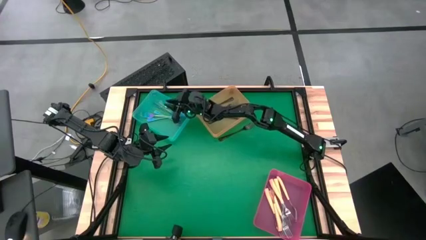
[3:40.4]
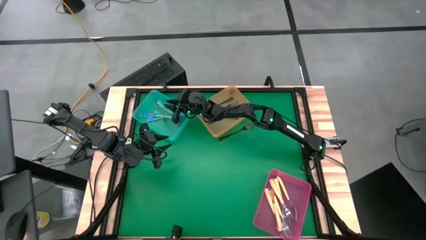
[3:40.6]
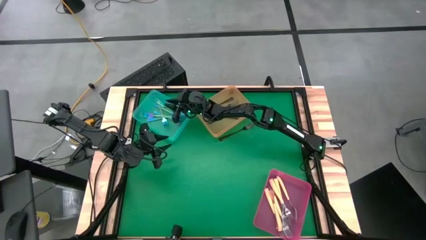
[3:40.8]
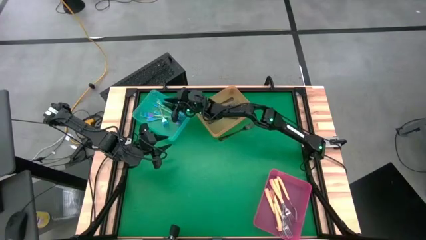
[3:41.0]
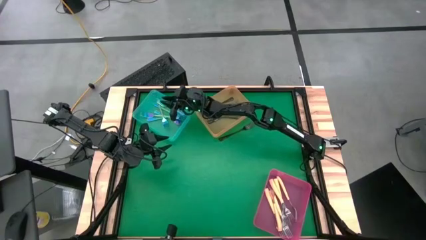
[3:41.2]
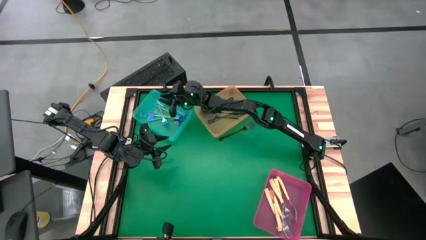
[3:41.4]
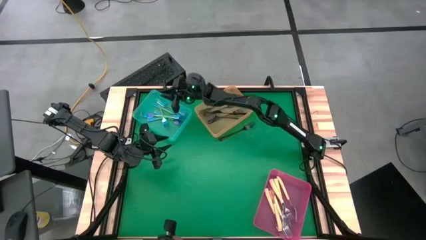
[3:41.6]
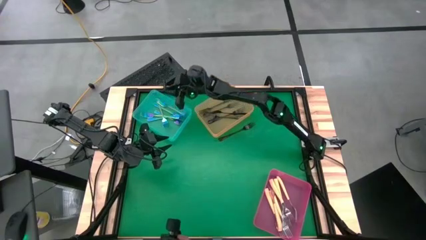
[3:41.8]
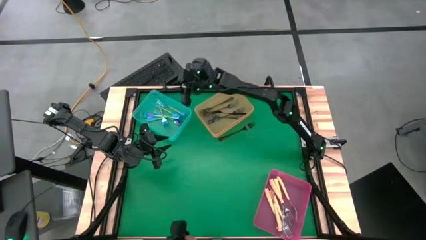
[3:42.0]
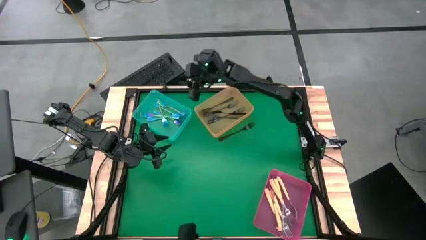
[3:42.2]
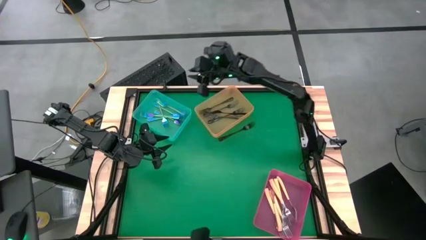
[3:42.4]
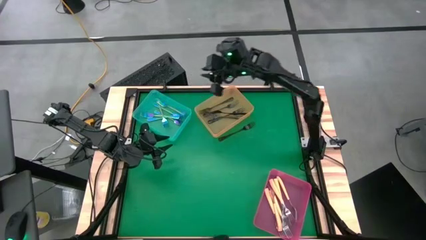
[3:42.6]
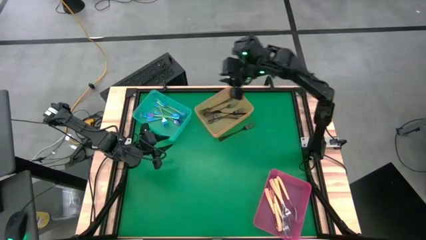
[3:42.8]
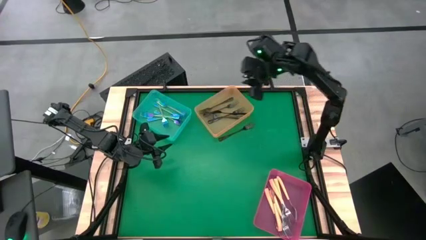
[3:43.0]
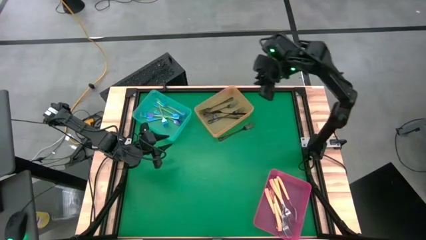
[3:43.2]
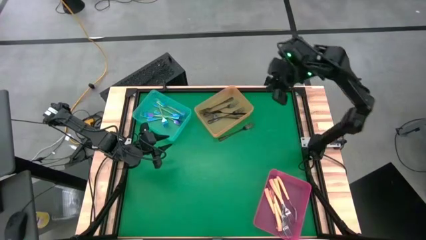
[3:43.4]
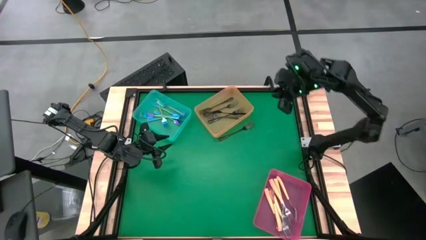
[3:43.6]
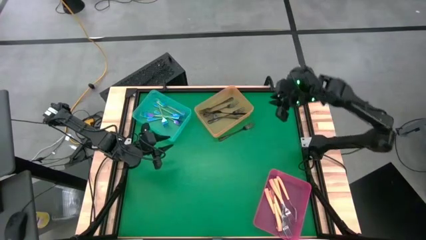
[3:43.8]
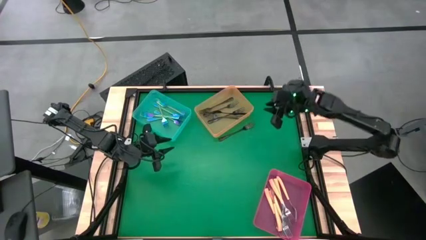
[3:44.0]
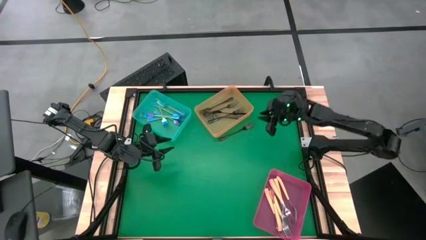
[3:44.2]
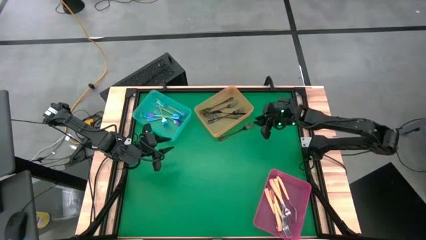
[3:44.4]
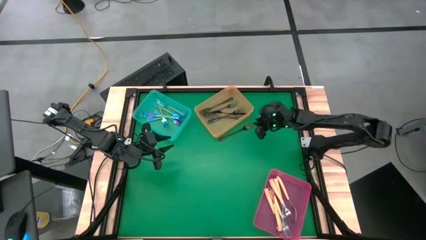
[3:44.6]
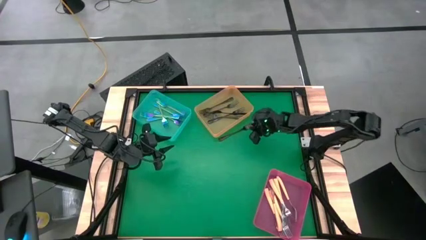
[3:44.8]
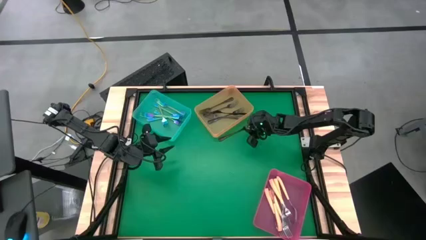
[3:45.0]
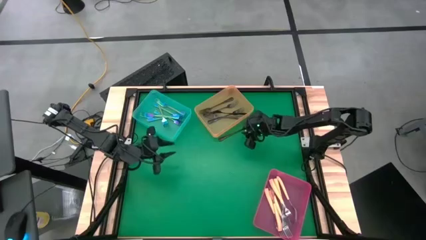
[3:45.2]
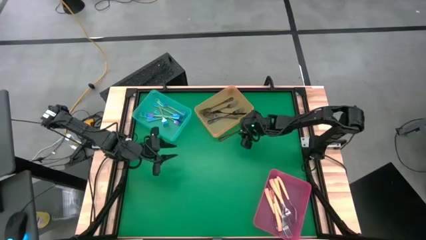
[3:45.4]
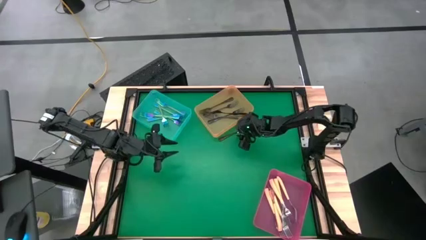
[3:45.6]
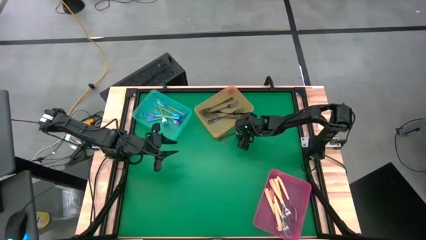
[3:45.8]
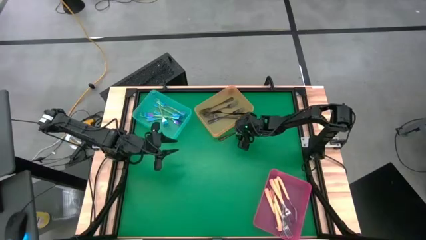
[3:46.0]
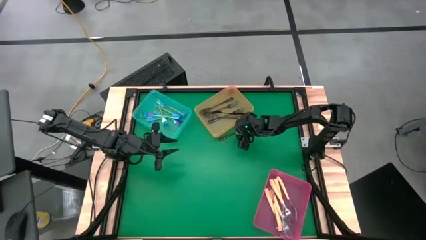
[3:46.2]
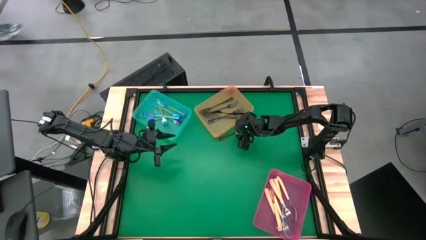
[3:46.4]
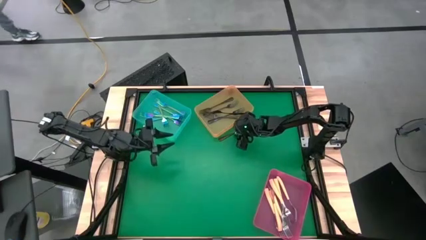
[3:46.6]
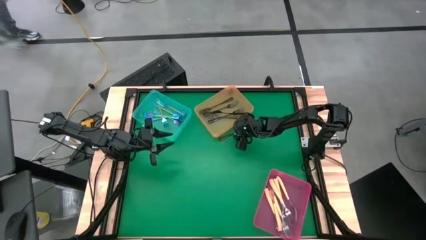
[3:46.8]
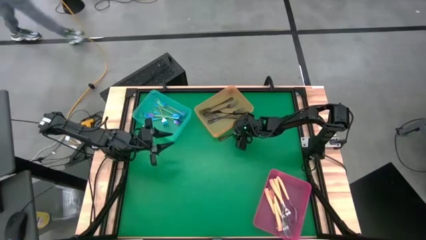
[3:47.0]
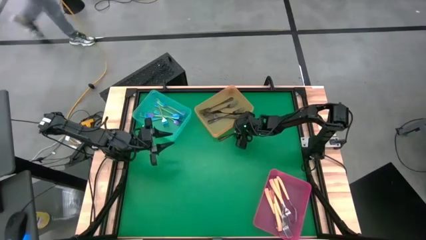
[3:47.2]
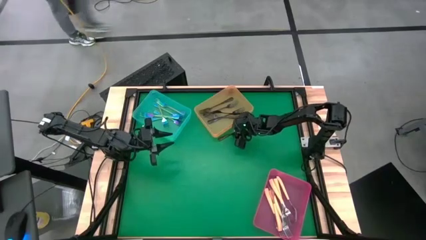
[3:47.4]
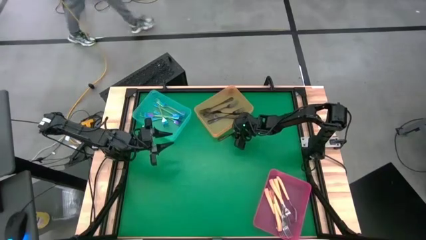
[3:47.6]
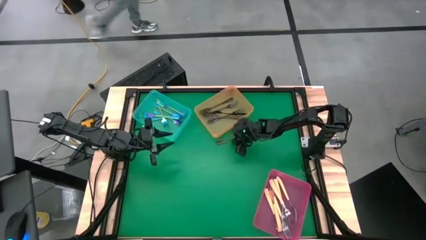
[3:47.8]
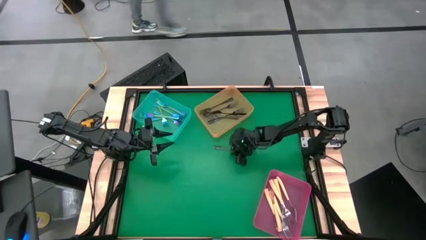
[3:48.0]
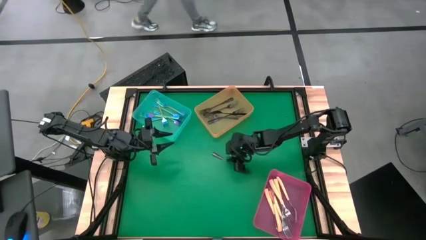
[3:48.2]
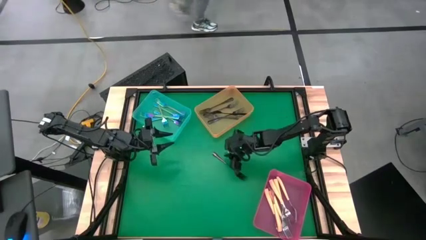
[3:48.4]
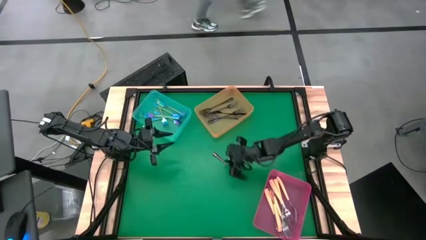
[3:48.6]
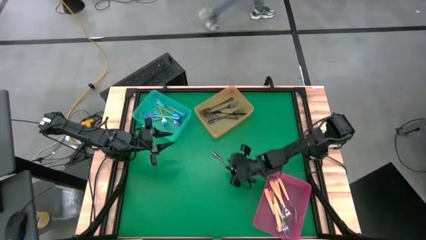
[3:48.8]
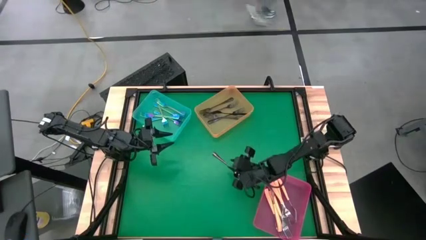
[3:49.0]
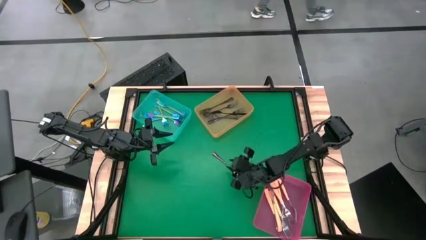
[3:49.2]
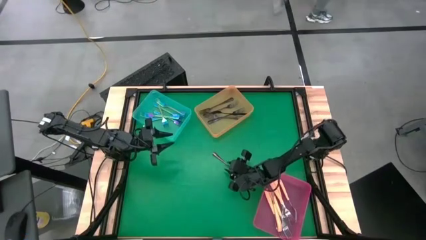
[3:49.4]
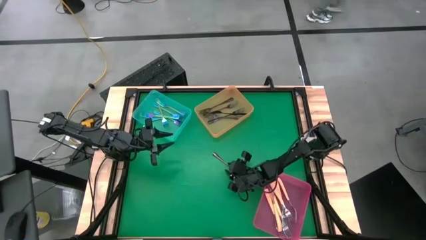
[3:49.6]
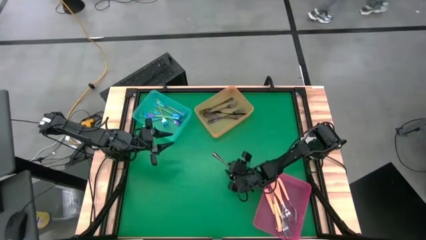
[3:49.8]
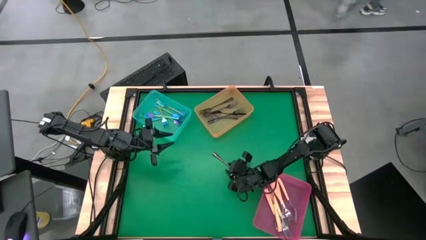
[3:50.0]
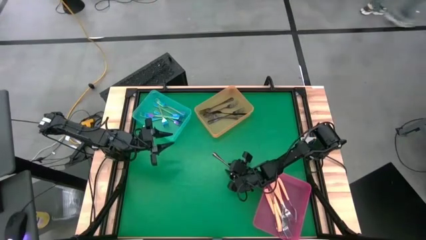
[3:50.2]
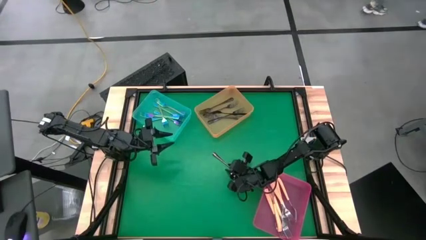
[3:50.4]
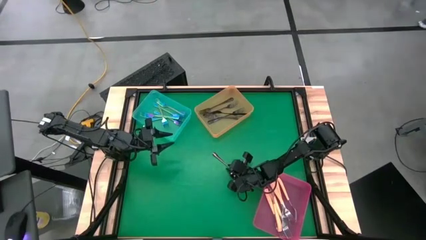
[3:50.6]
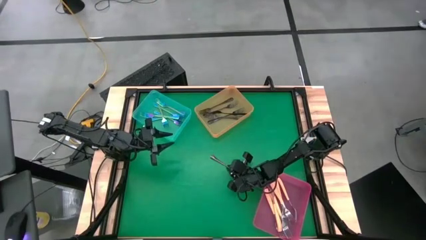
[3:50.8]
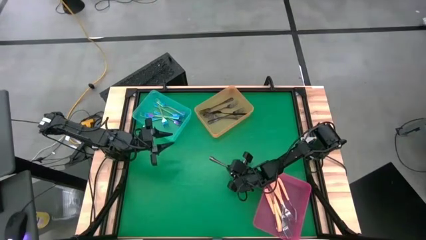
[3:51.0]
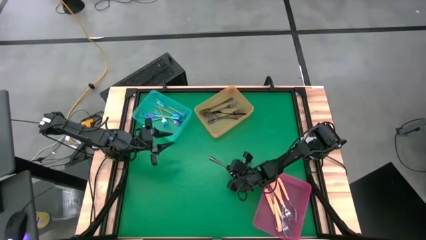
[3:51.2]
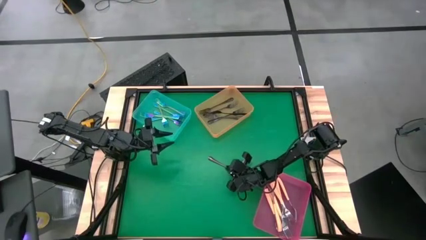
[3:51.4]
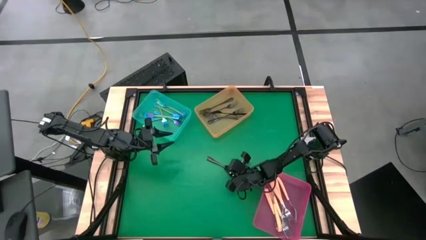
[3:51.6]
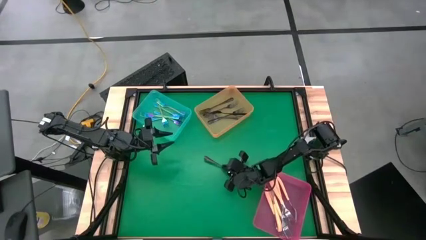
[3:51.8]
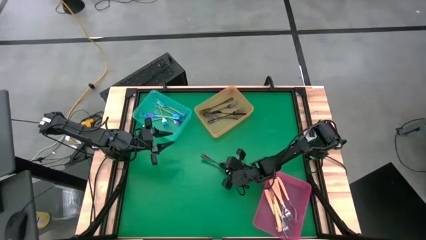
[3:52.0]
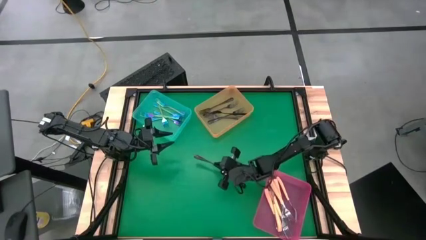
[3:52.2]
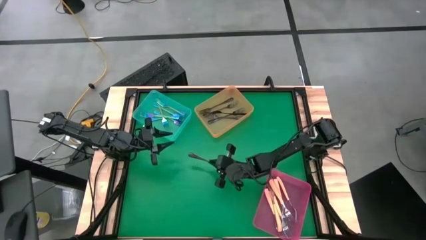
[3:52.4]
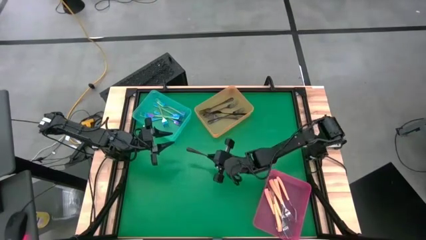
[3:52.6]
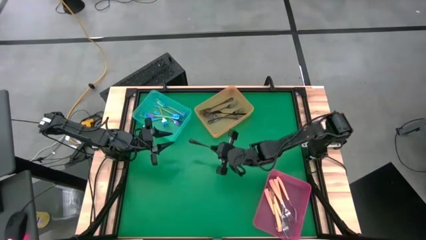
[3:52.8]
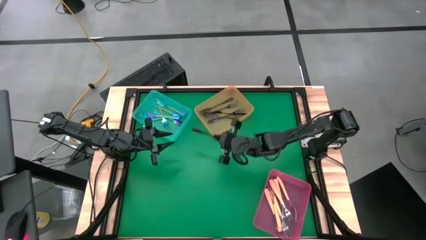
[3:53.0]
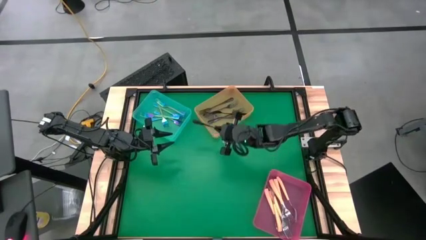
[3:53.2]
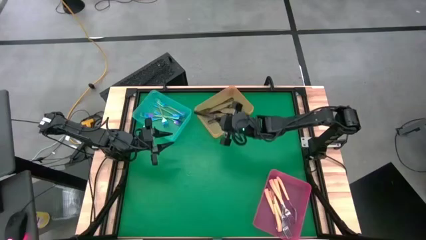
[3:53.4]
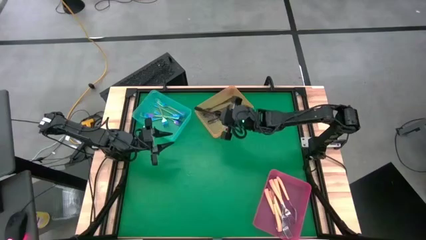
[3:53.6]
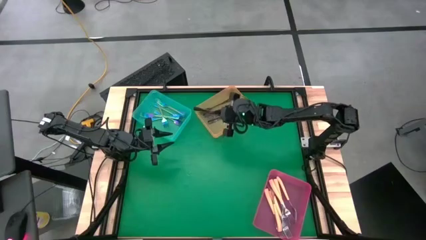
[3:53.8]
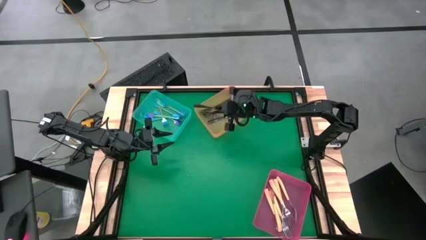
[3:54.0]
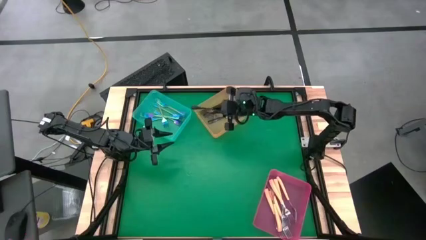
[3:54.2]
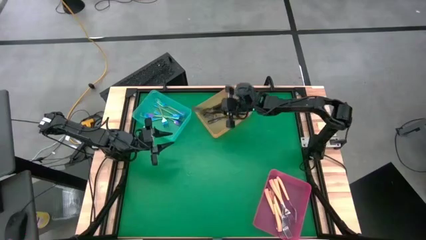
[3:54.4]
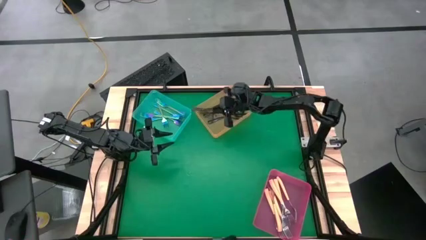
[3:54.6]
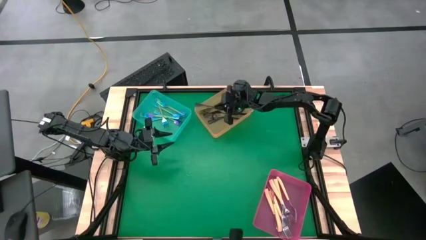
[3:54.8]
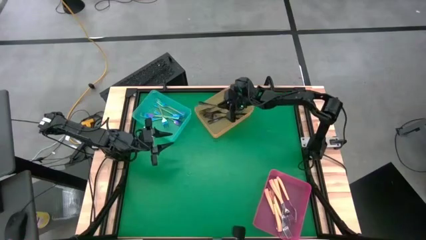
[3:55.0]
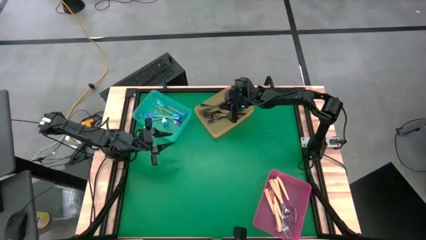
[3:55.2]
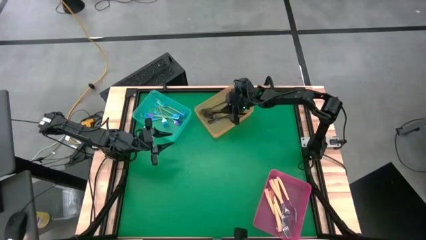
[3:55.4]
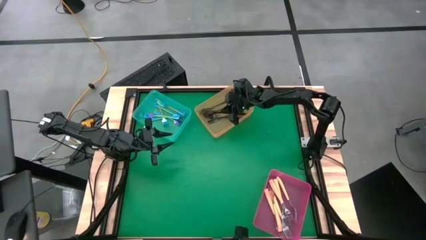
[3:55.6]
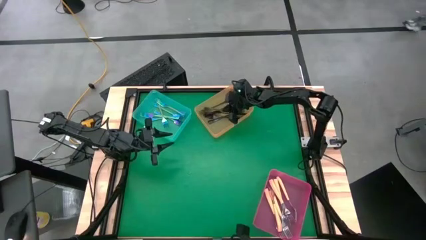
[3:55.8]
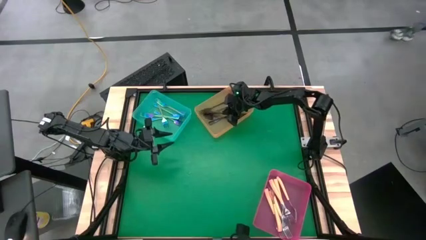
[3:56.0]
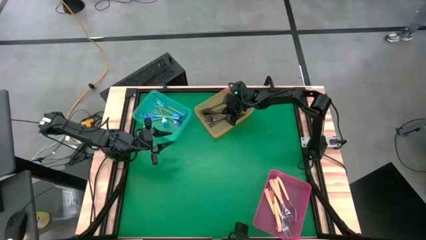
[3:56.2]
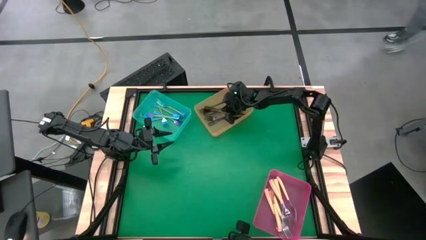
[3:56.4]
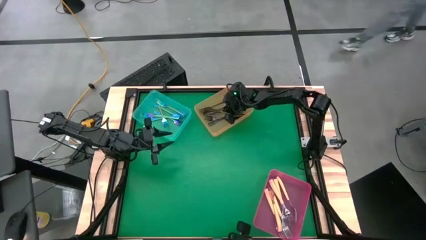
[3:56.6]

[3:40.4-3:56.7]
Task: Sort silverware by color (type)
Put the black fork into the yellow bin
